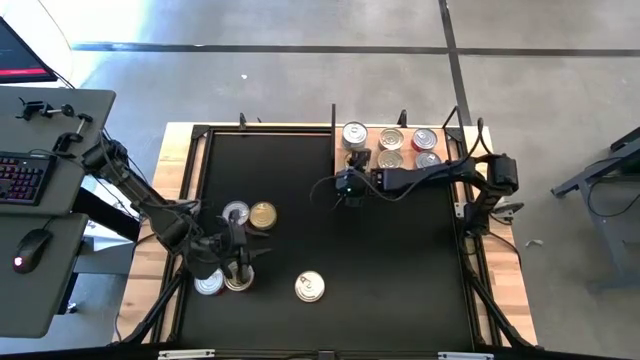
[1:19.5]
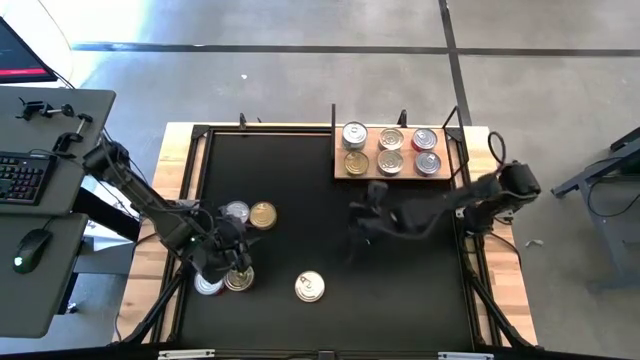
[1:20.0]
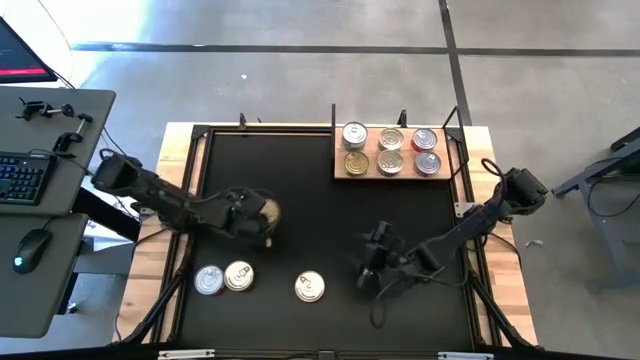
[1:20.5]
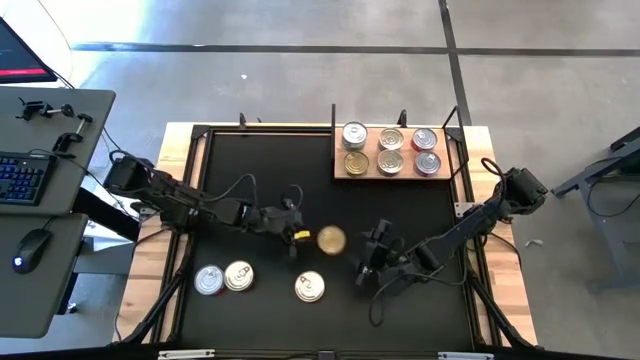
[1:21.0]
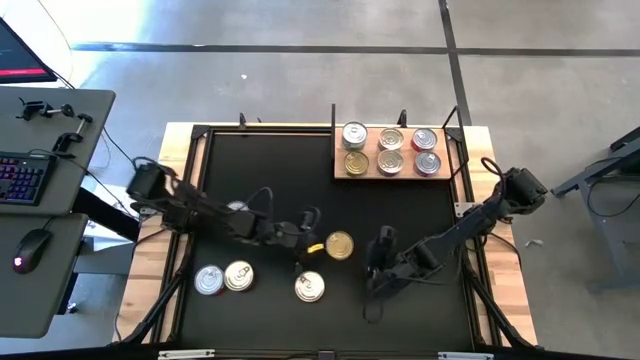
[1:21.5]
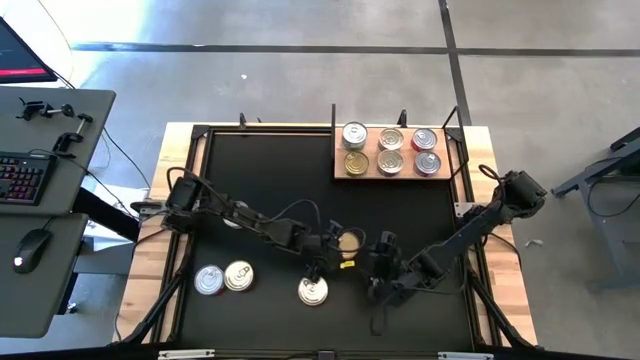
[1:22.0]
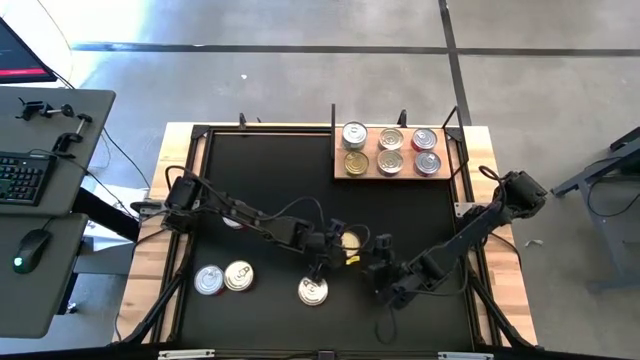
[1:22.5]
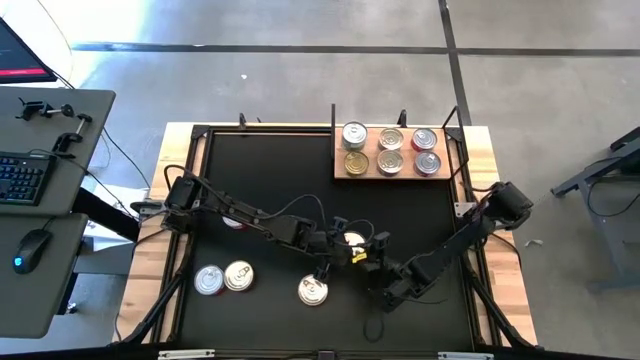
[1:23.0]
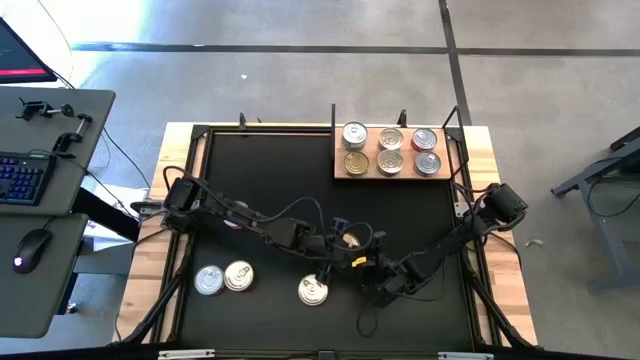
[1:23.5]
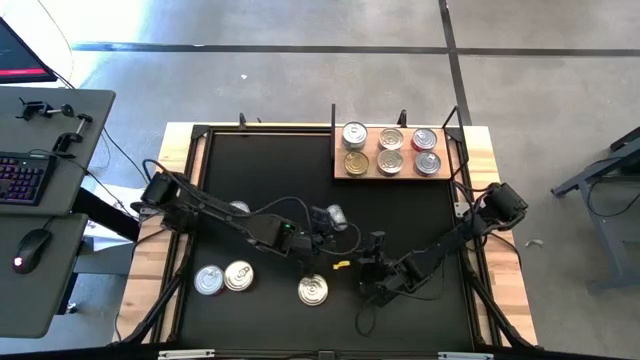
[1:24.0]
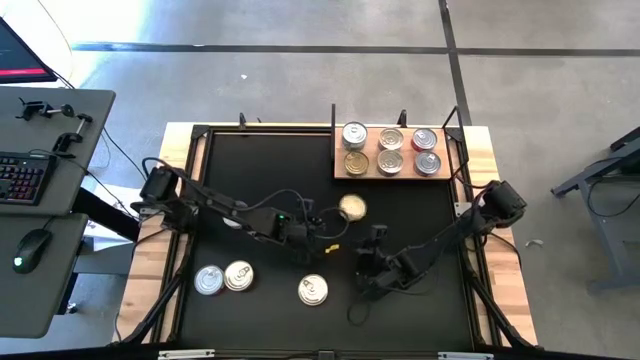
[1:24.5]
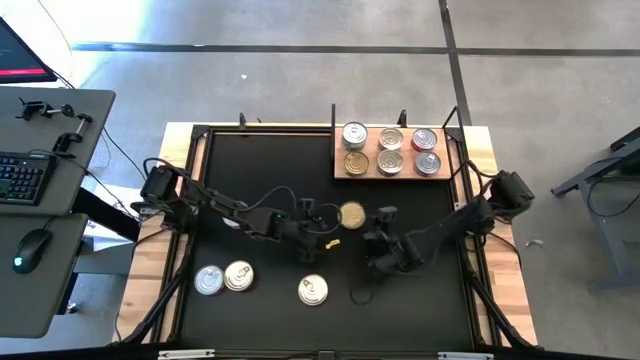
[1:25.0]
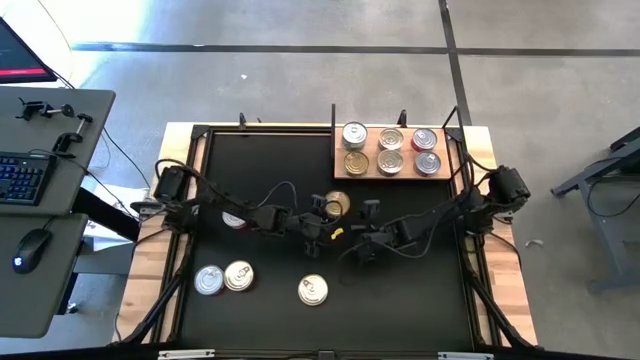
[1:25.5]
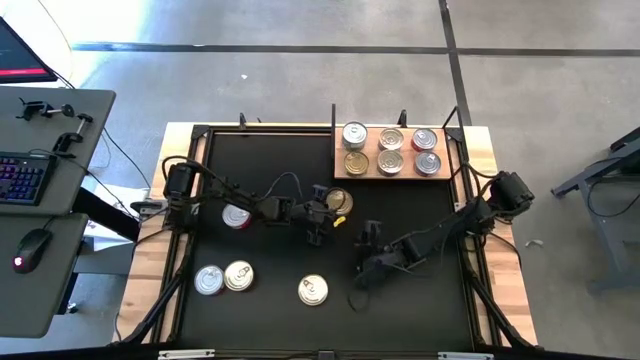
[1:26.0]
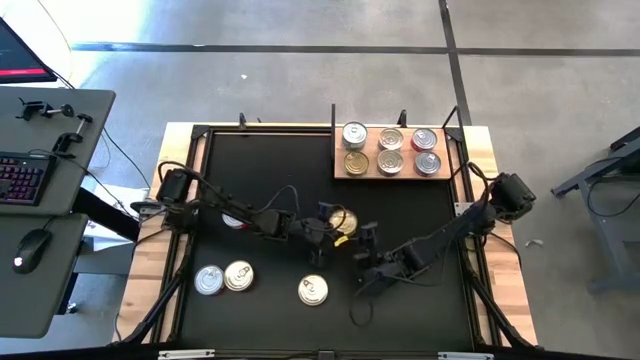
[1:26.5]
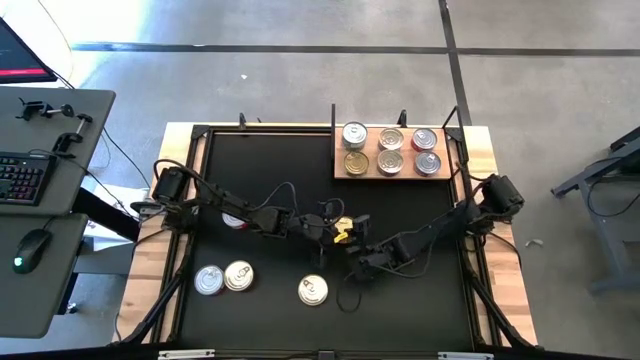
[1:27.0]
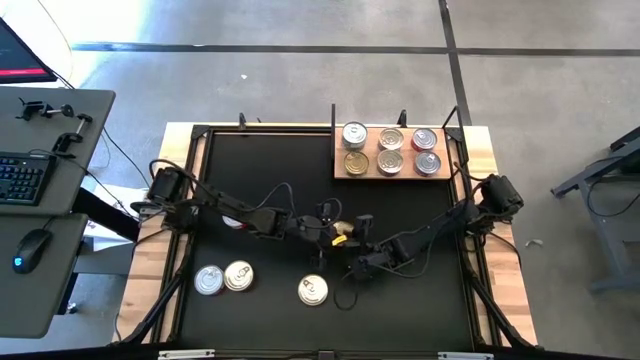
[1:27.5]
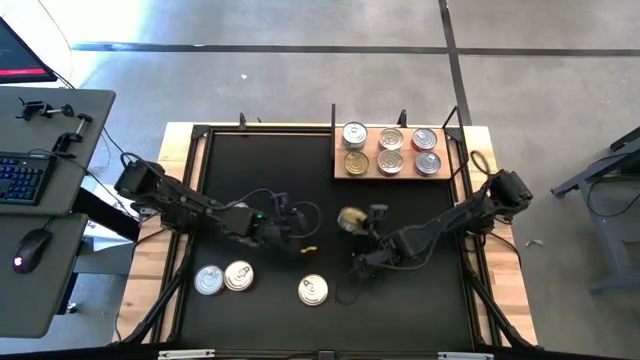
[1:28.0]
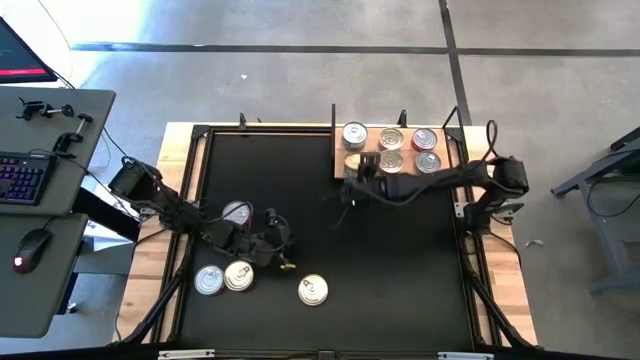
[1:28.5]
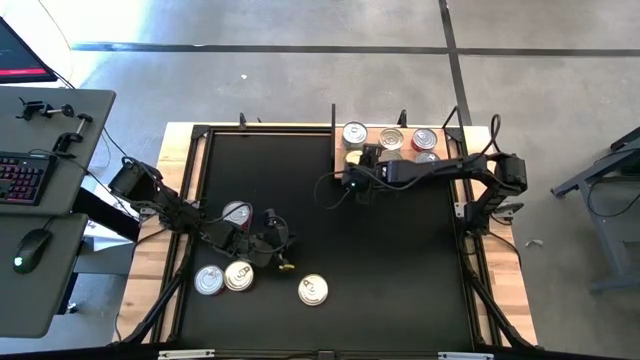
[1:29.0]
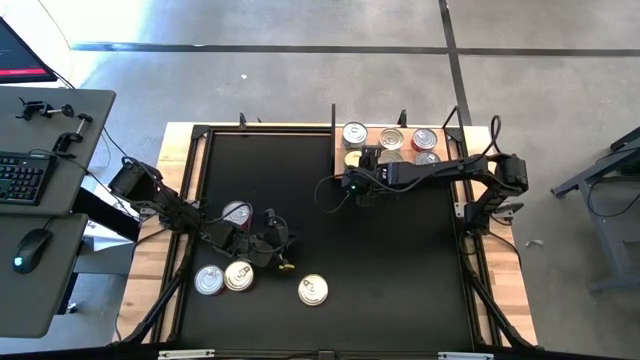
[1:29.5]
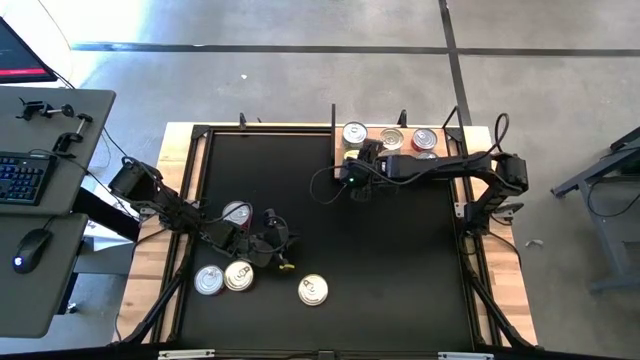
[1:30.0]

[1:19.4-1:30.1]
Task: Stack canned seafood by type on shelf
Stack the green tuna can on top of the other green tuna can on the shelf

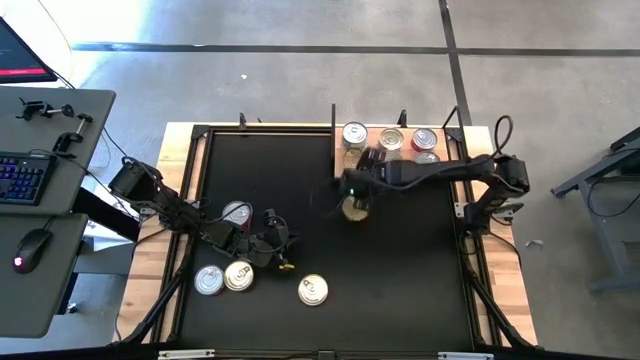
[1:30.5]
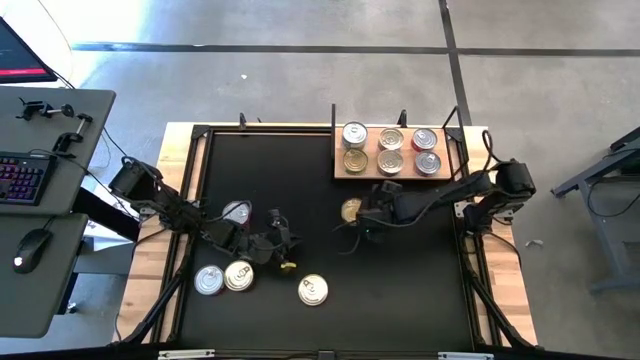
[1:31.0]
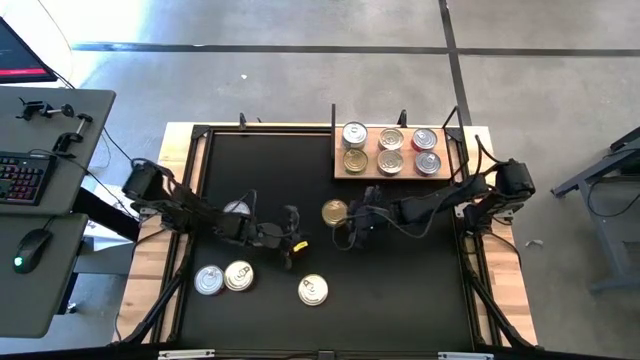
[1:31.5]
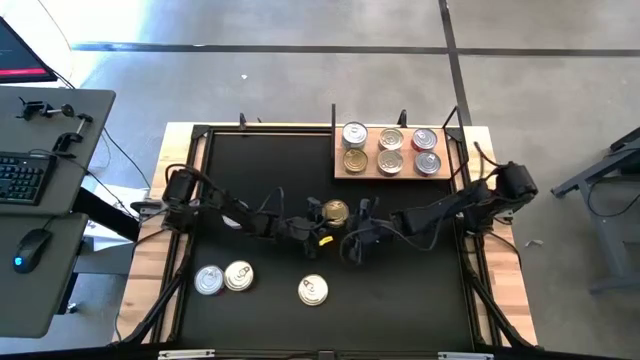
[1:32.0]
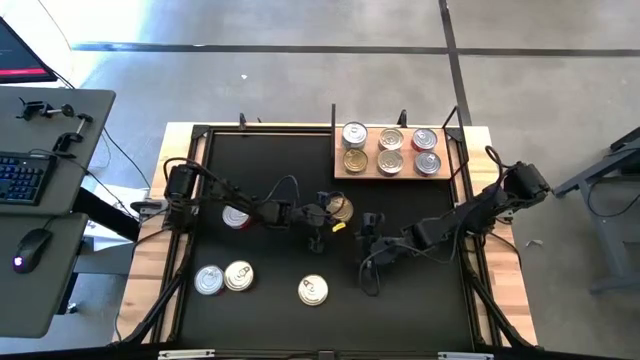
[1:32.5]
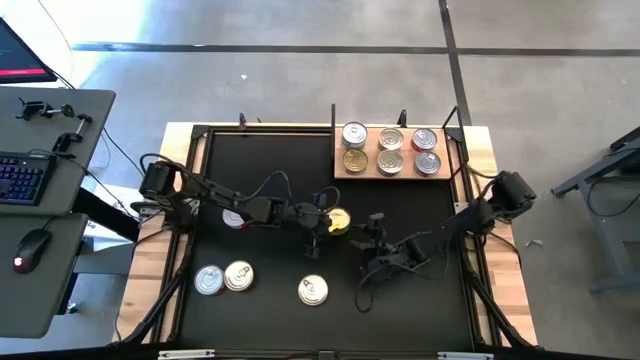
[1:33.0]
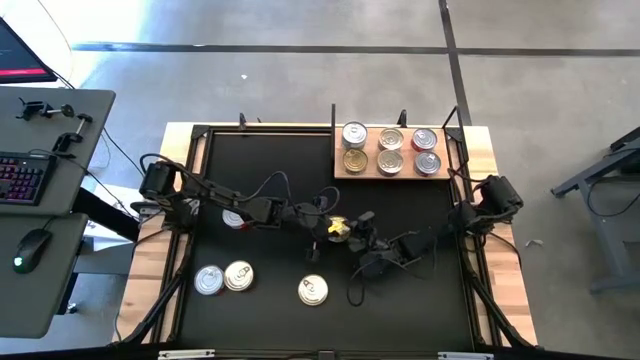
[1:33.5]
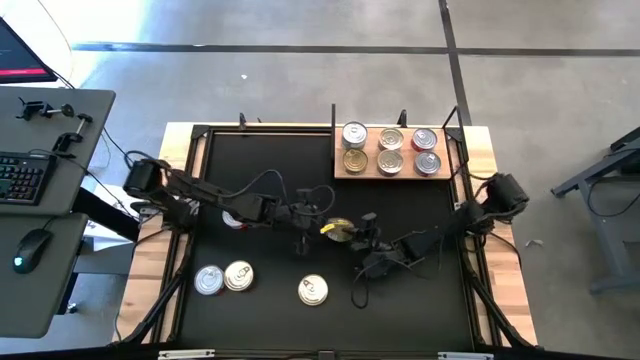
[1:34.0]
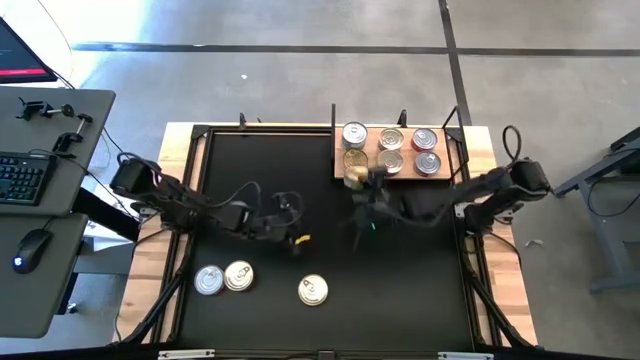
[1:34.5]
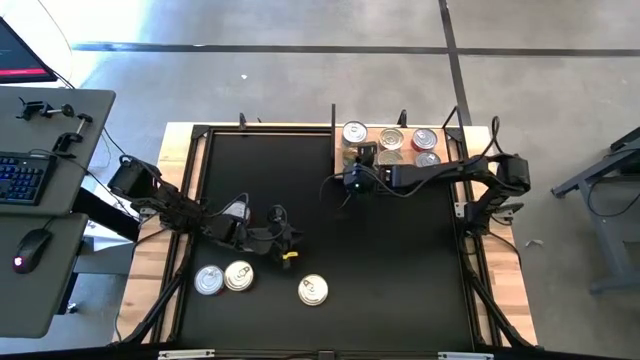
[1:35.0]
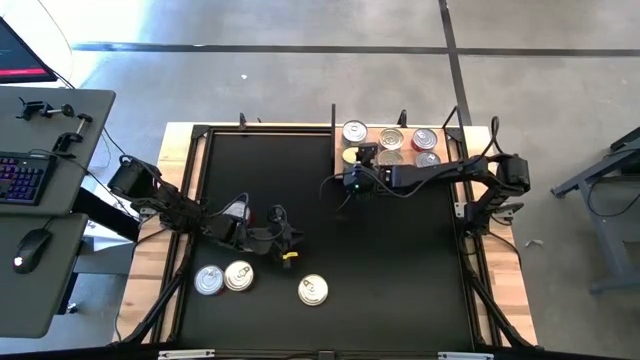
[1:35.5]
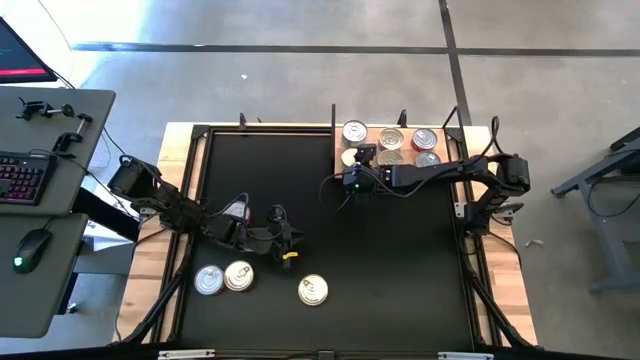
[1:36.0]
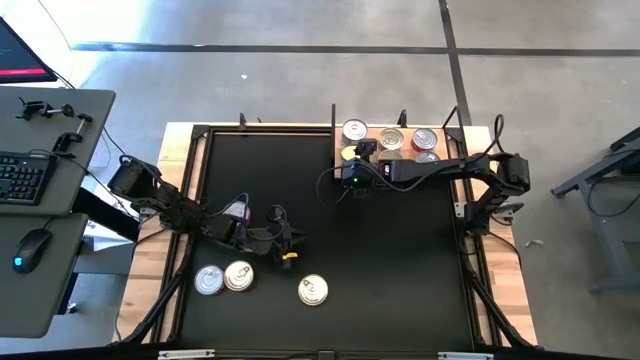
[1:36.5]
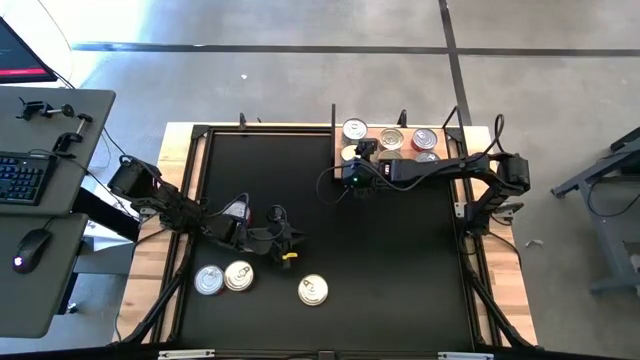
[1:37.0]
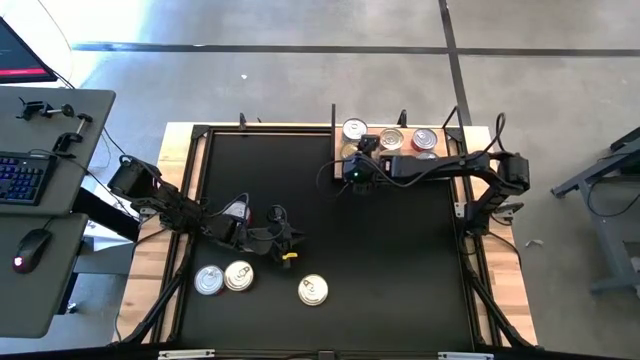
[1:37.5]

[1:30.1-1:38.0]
Stack the green tuna can on top of the other green tuna can on the shelf

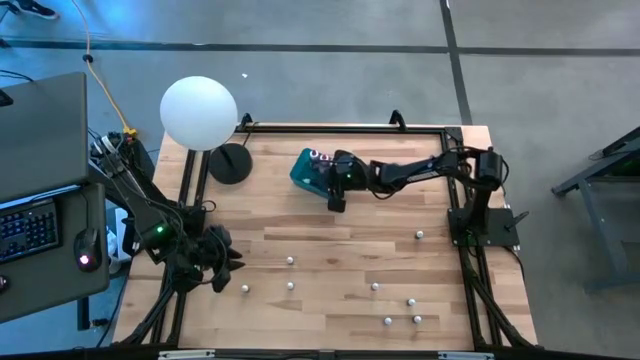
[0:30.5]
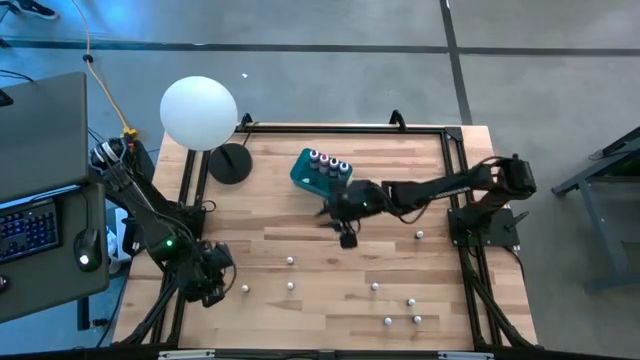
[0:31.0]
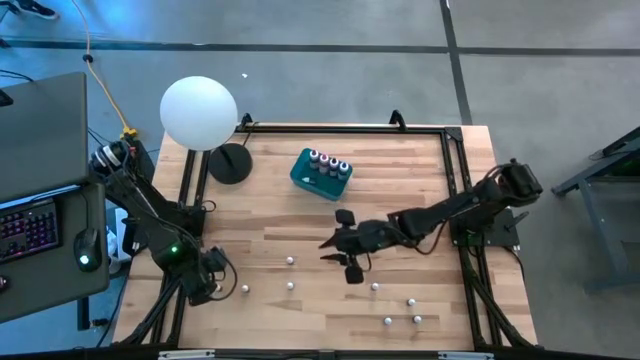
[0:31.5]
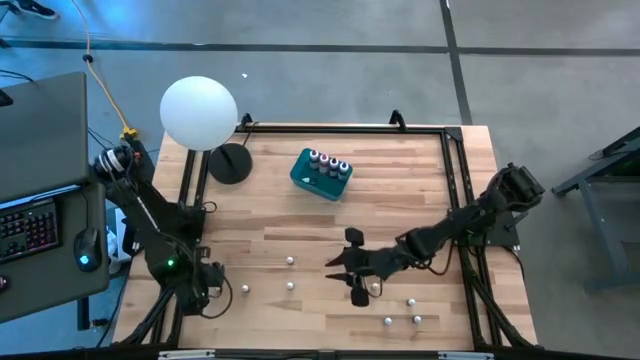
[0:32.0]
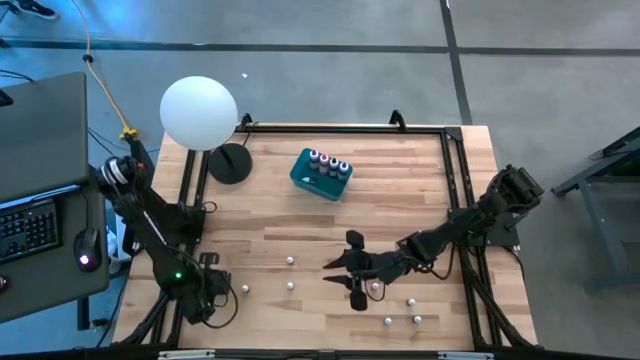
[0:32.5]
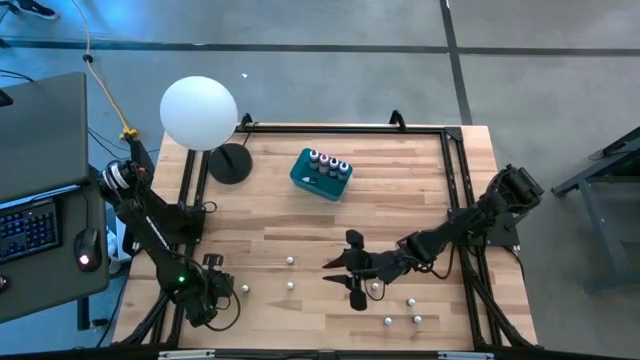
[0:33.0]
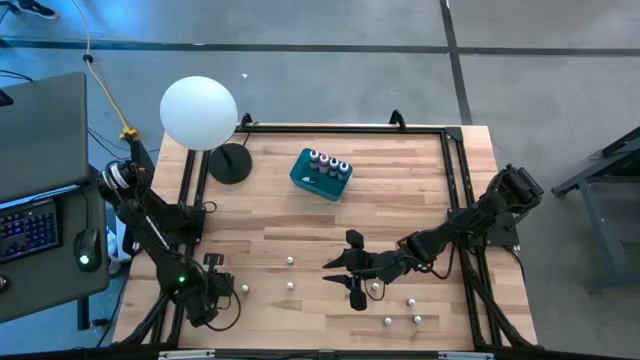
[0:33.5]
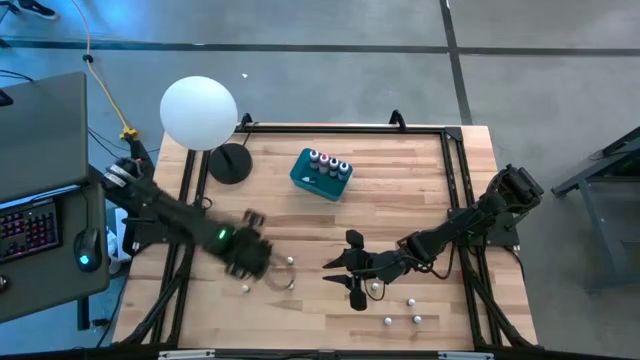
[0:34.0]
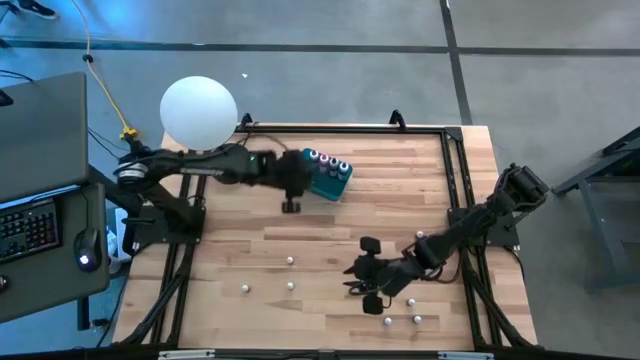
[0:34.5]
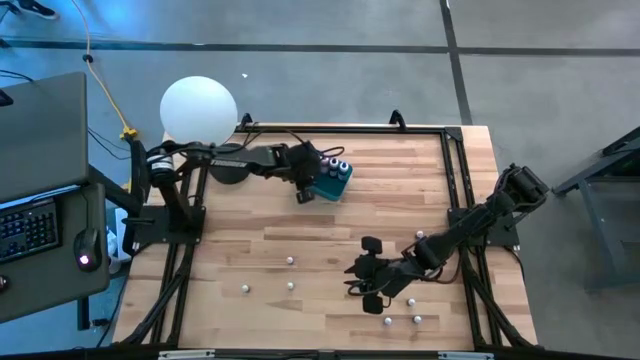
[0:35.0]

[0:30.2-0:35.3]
Task: Pick & Place food coloring
Put the green food coloring bottle into the blue bin
